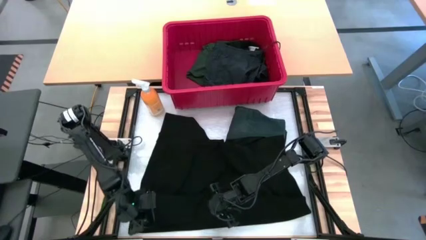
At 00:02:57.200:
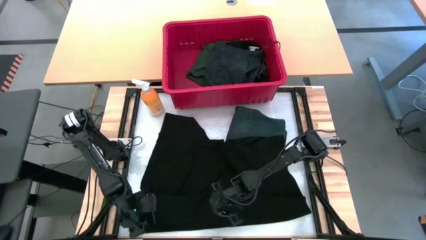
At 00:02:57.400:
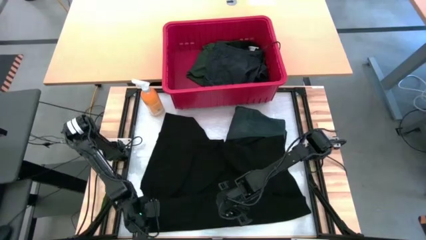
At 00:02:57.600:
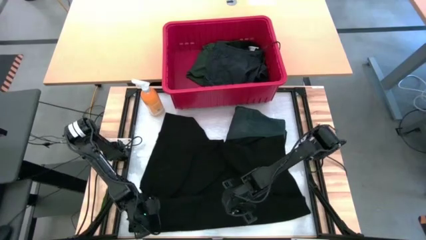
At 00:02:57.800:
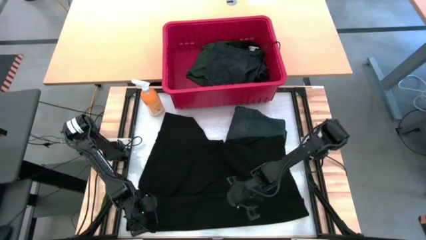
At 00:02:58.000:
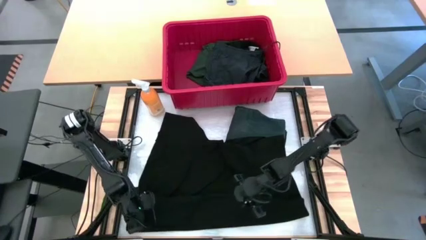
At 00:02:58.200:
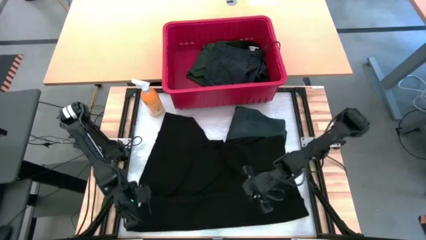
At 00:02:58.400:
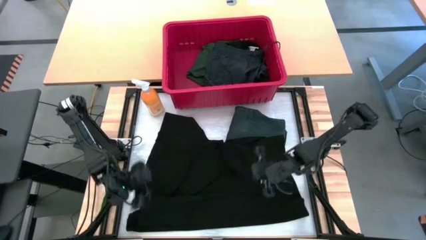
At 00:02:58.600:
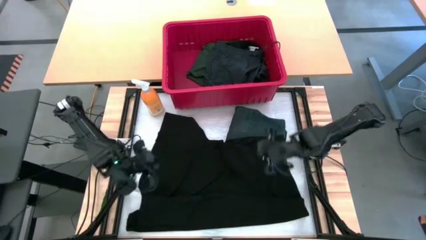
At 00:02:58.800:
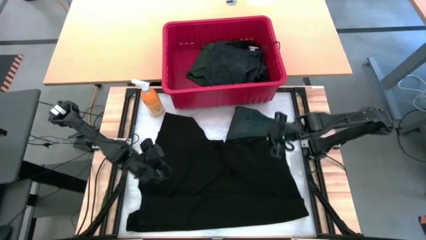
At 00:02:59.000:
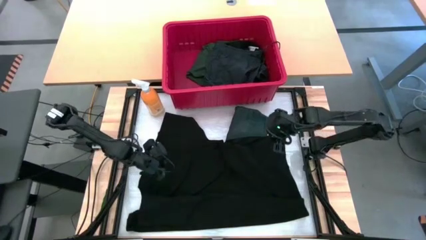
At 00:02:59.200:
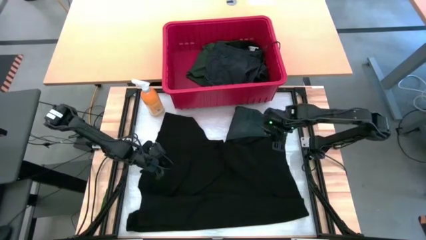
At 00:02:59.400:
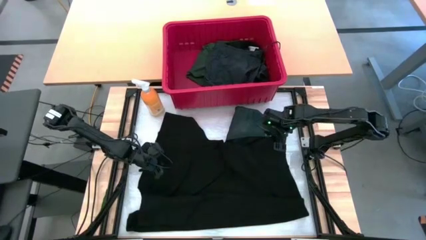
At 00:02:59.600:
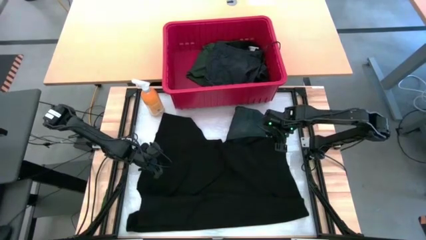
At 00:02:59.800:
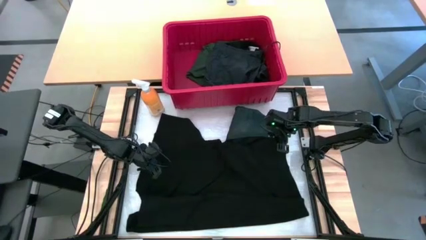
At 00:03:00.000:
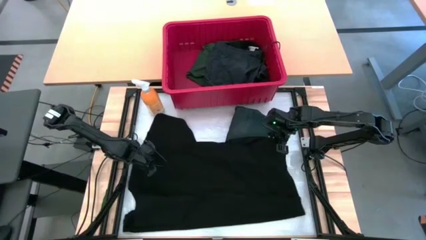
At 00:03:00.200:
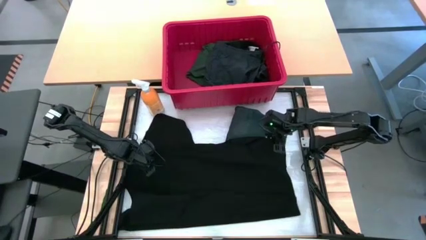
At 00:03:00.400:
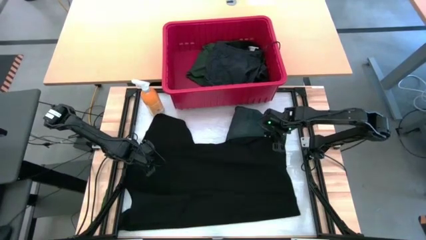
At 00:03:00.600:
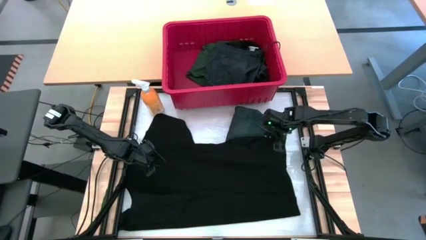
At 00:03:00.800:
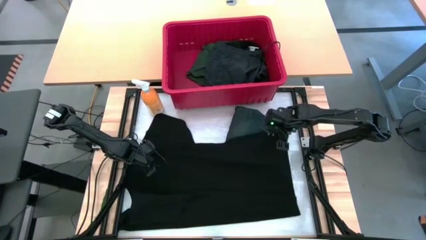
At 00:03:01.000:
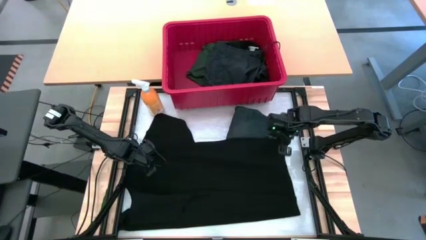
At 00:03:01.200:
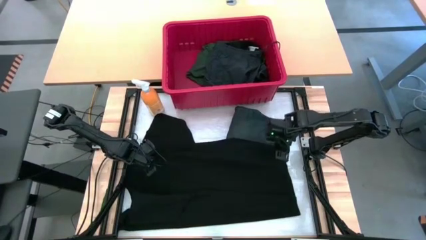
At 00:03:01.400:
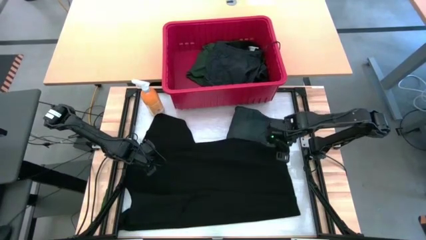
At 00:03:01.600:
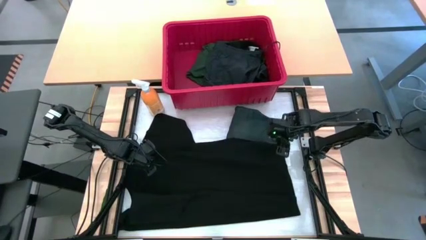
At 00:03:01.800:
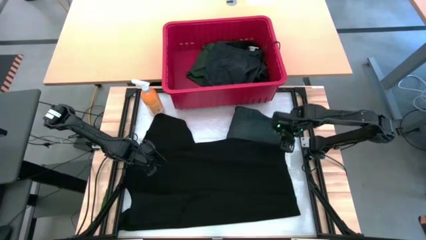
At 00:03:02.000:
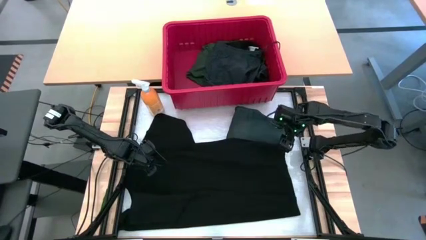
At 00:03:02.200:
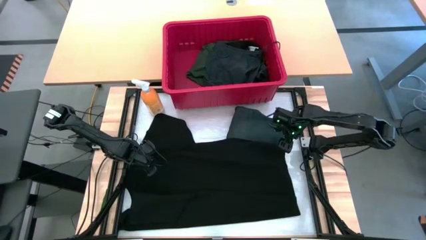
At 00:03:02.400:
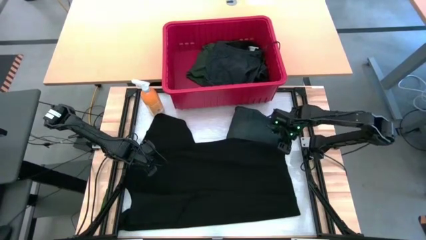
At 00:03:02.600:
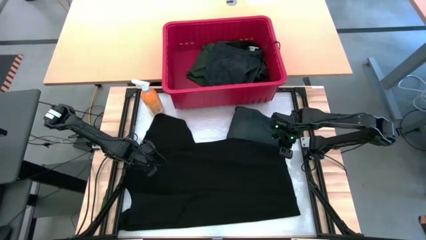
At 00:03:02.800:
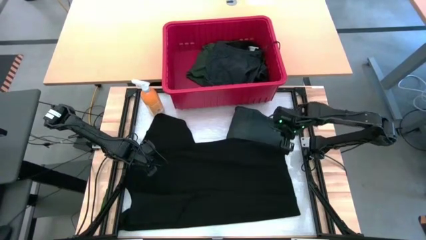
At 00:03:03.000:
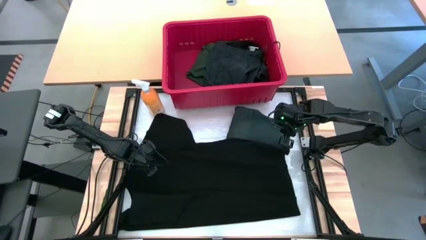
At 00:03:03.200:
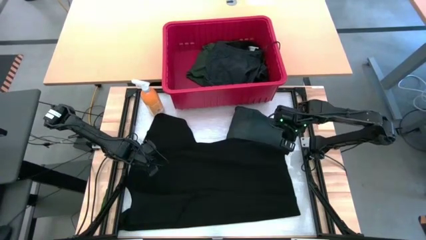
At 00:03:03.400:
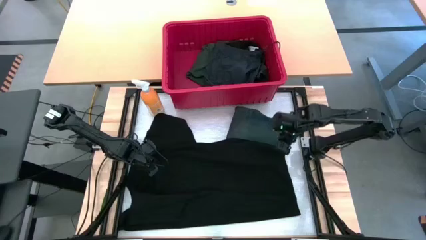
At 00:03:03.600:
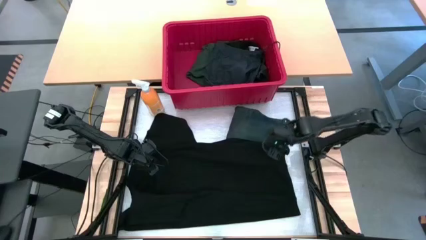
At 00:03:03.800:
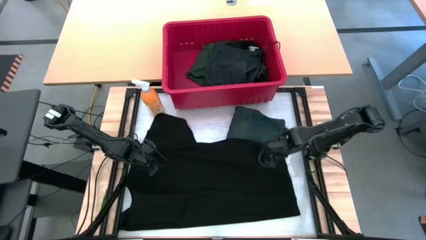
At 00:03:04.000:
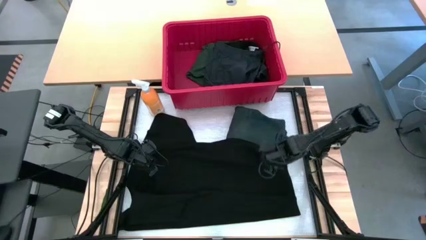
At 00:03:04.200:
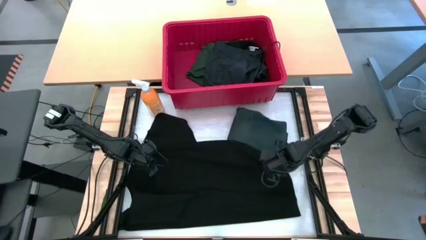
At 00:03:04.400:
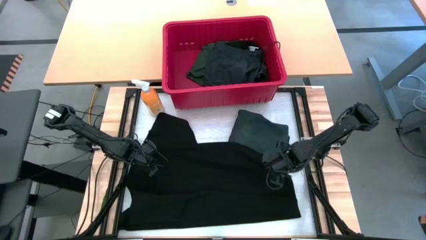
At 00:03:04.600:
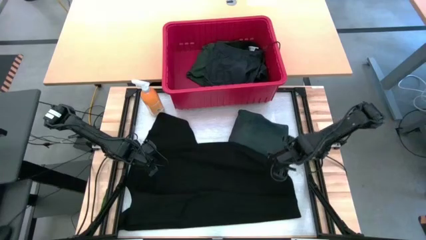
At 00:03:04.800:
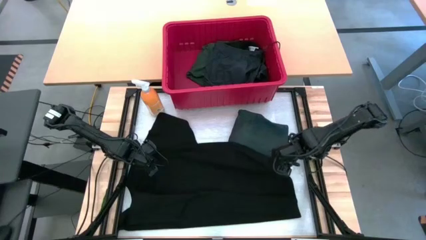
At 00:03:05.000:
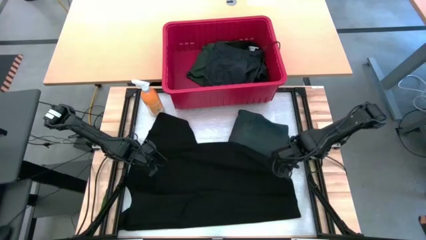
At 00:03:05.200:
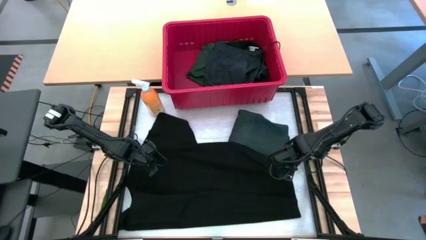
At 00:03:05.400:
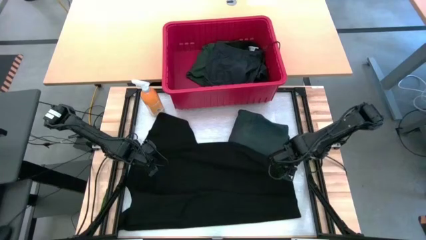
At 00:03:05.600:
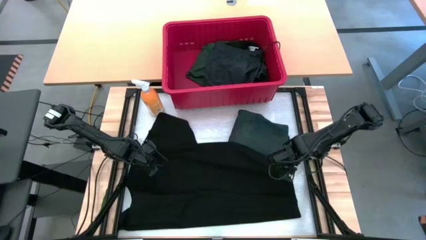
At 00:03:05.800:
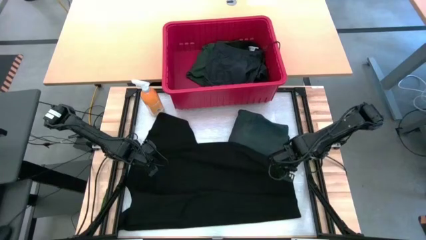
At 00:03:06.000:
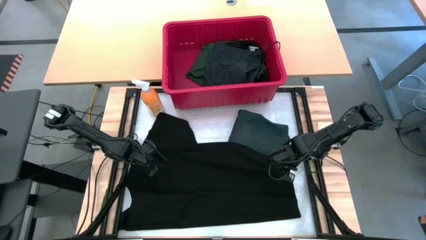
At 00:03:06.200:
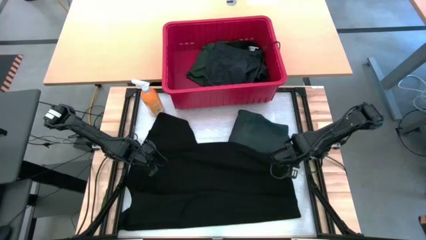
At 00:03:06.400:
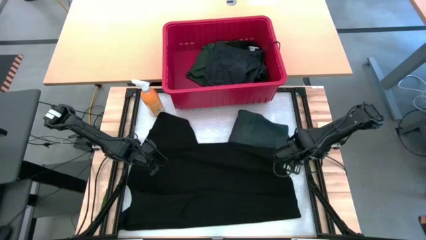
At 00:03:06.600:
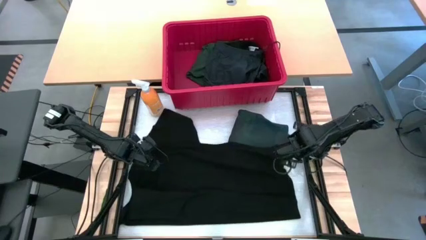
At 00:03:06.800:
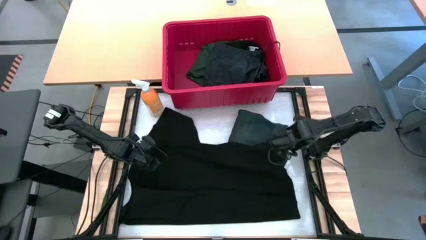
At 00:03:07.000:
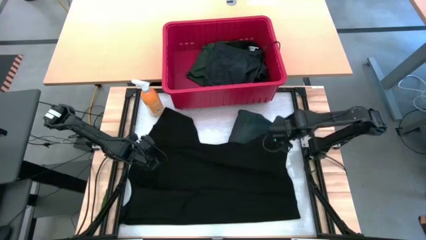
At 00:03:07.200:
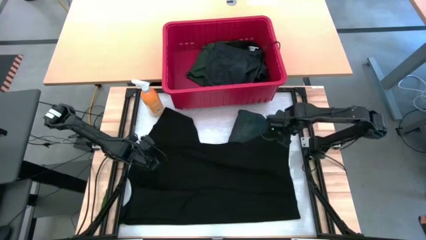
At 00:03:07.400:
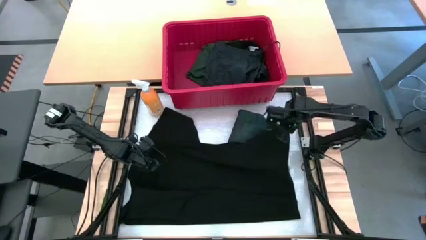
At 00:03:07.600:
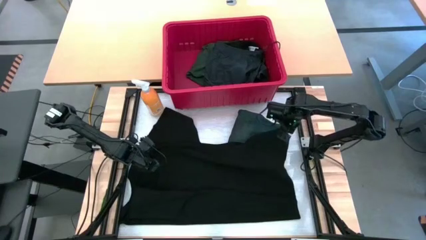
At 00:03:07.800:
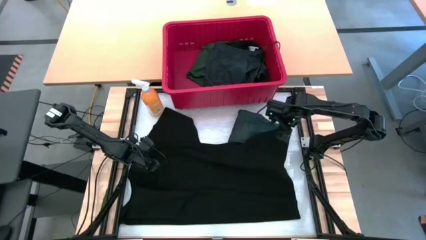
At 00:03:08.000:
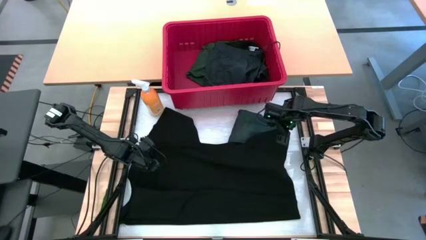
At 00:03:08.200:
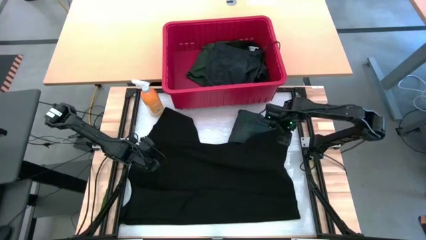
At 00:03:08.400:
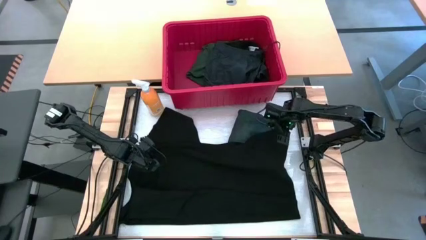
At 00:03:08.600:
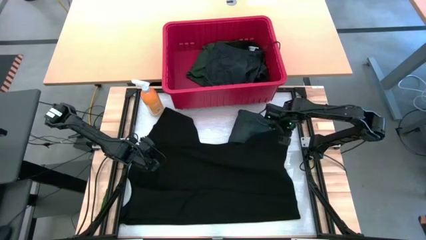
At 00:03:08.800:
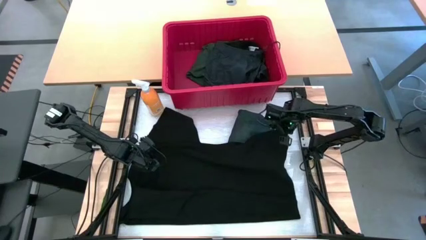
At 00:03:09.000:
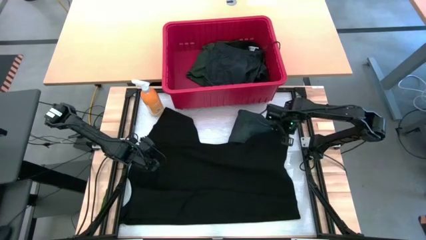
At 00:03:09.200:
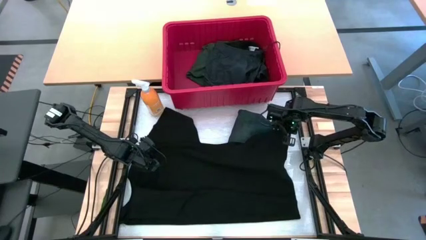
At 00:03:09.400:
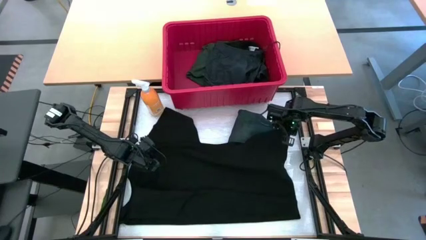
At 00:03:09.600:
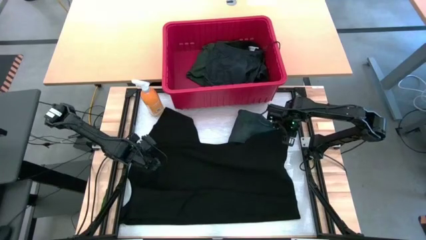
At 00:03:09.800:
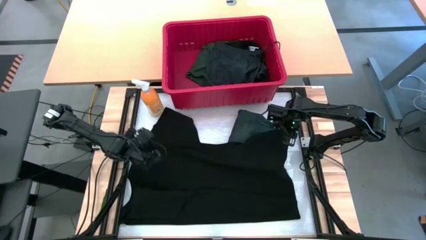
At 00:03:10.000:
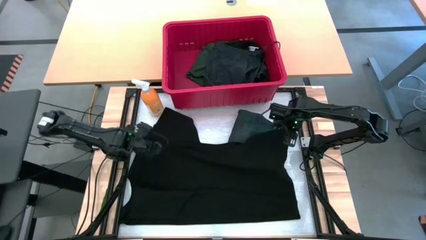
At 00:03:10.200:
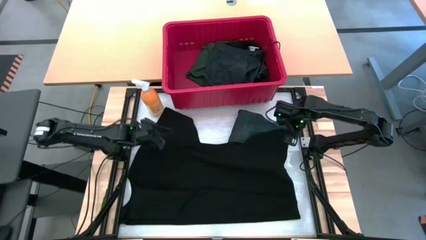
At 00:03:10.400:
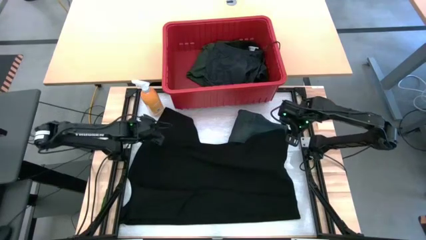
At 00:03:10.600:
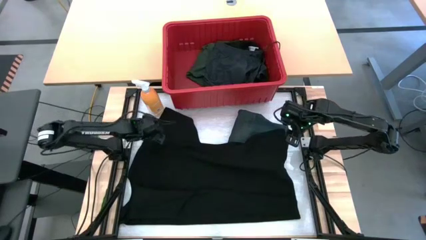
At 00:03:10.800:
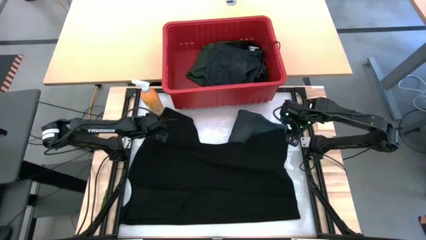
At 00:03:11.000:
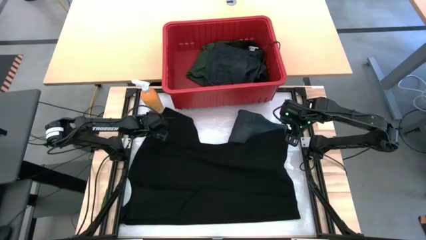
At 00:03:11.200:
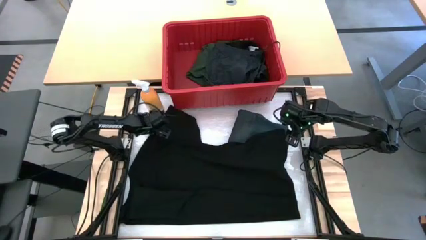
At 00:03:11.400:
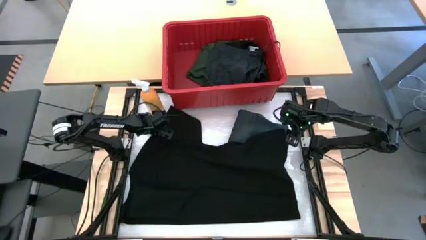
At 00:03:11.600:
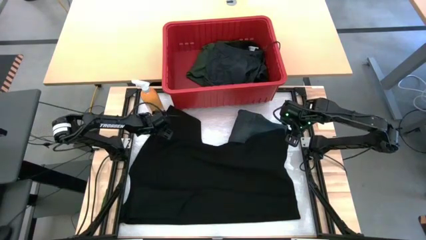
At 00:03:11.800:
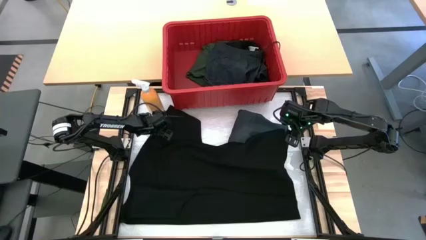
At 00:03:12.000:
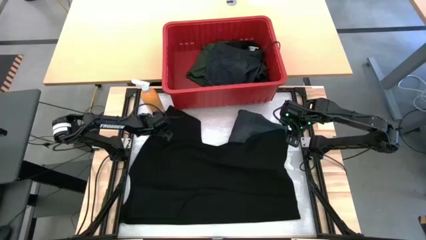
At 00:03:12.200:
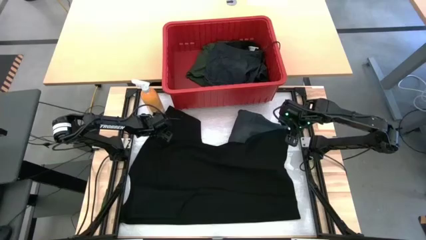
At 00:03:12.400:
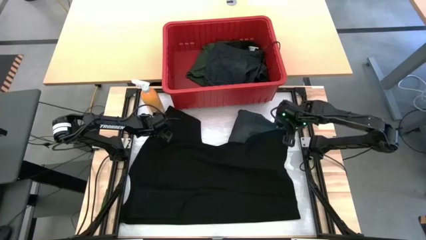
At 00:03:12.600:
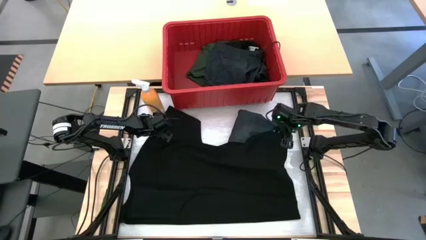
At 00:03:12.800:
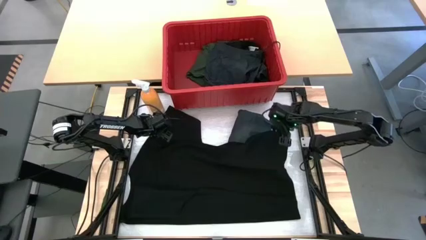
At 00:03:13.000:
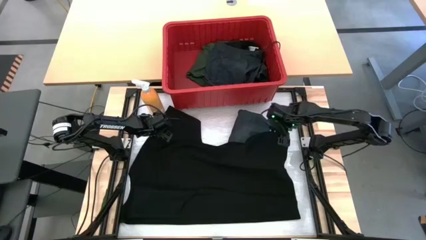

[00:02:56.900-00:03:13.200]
Task: Fold Laundry from Bin
Fold the black shirt
